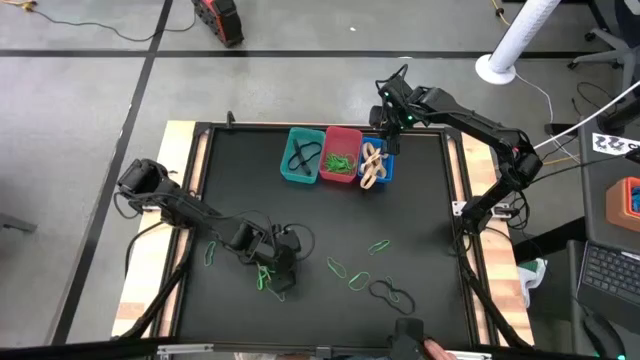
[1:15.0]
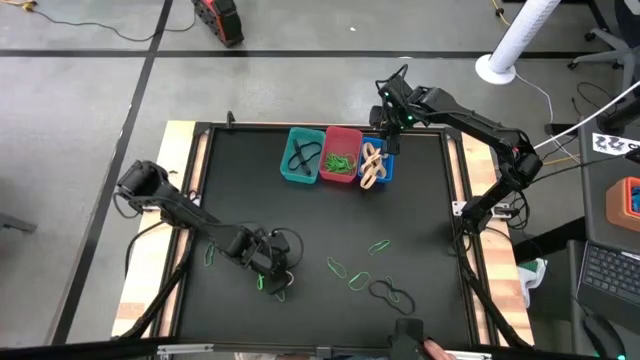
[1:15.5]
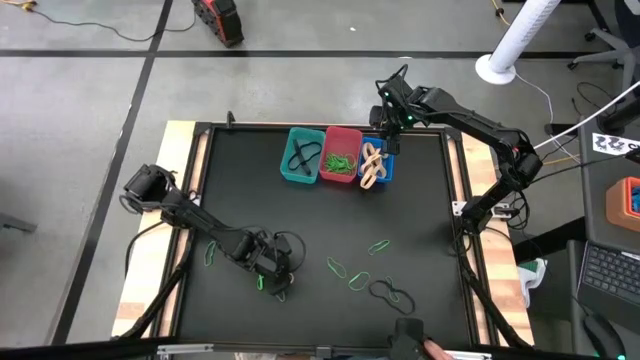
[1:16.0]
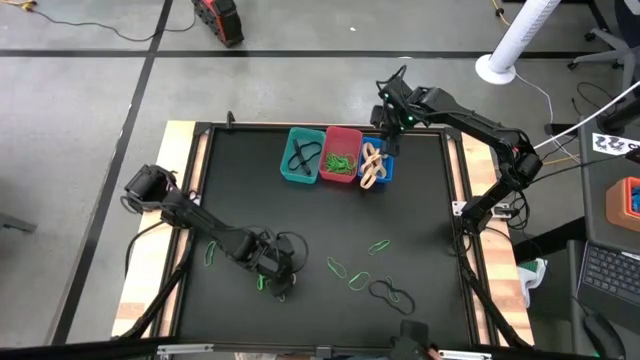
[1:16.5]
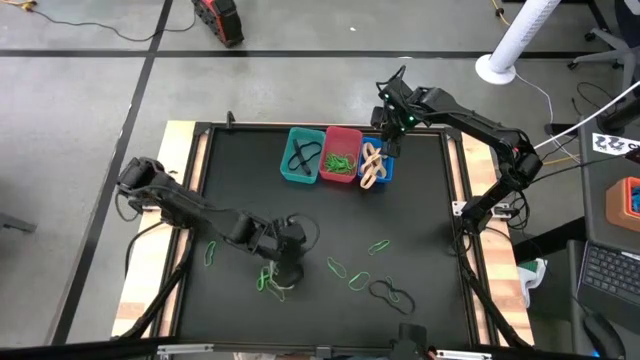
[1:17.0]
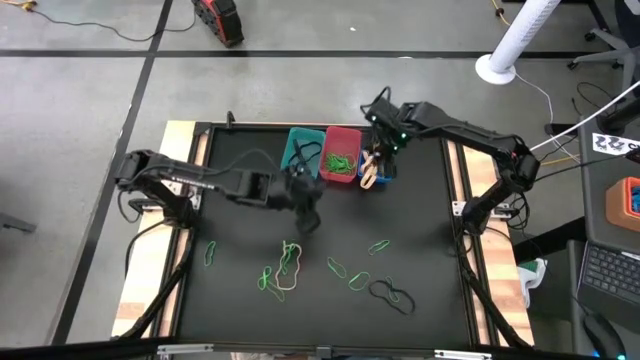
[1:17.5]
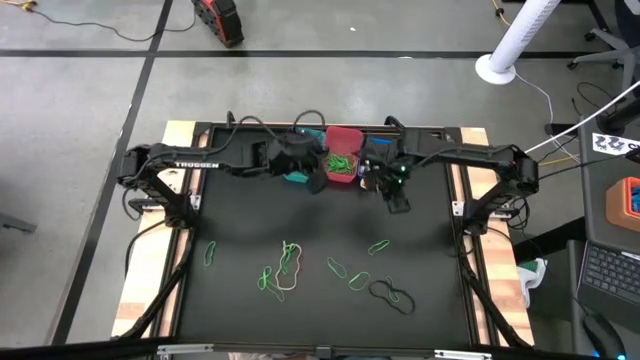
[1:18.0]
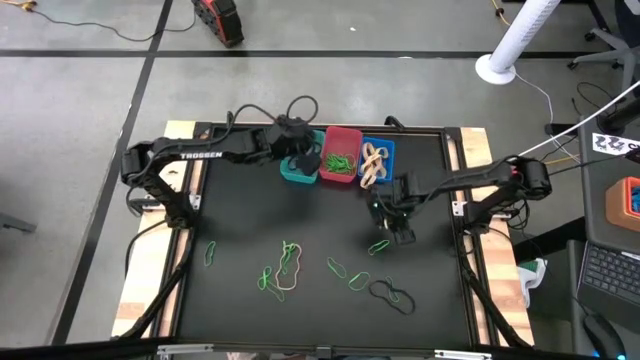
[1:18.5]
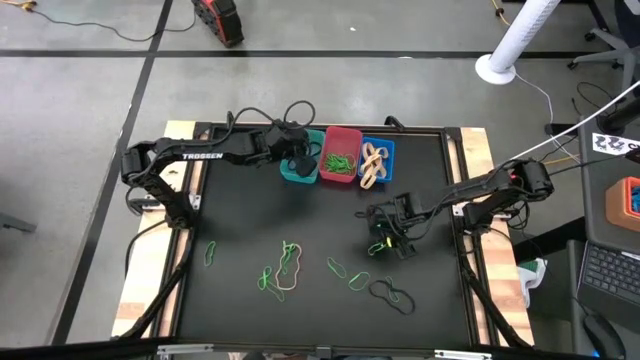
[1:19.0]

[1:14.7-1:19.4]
Task: Sort rubber bands into baskets
Put the black rubber band into the light blue bin

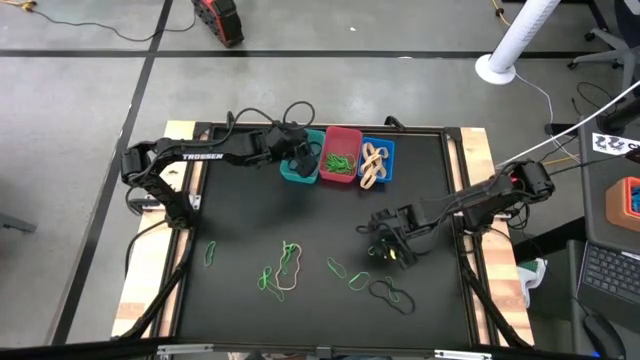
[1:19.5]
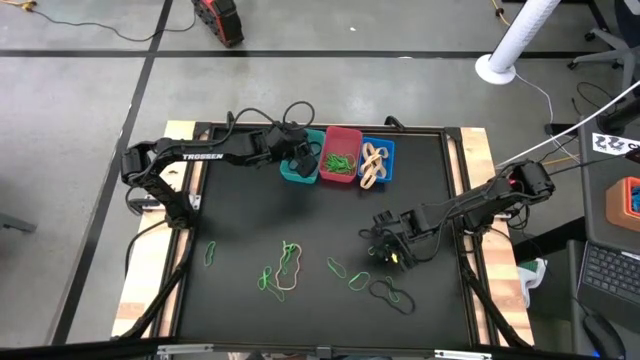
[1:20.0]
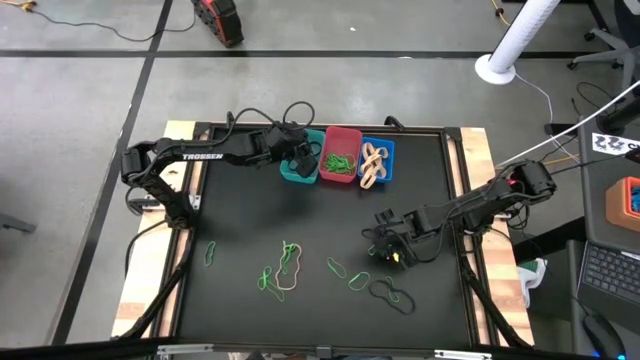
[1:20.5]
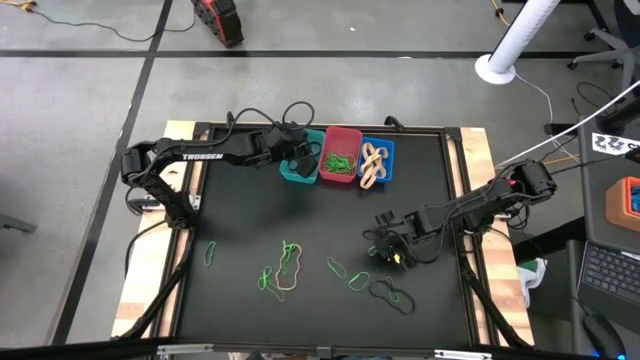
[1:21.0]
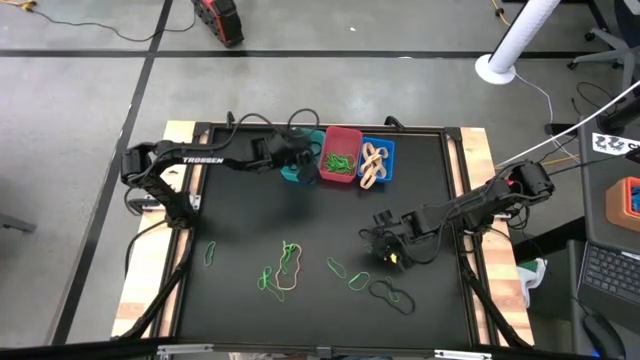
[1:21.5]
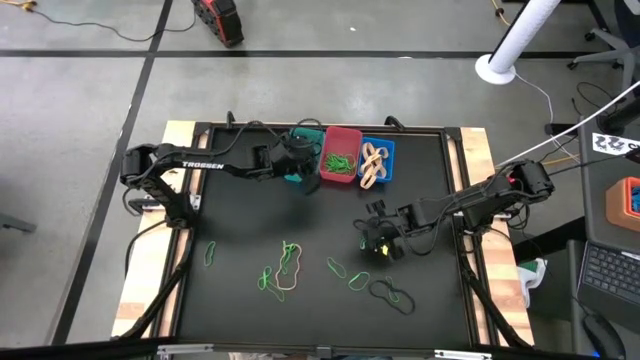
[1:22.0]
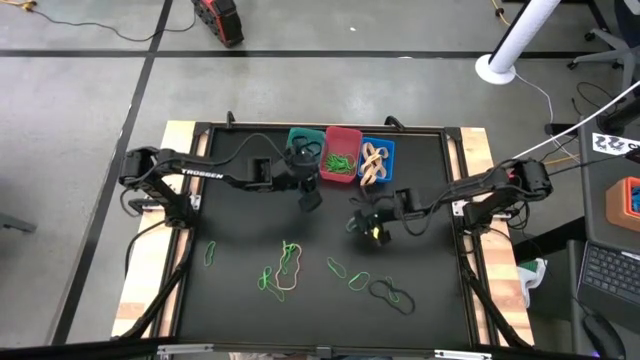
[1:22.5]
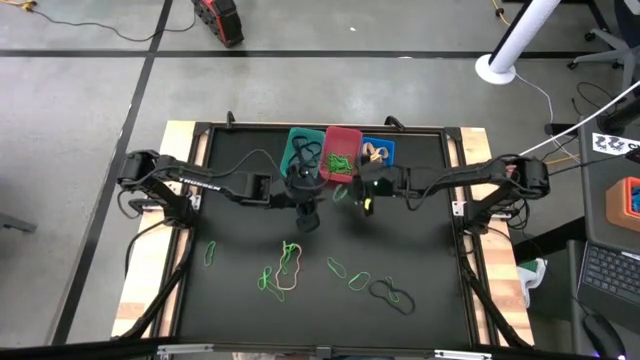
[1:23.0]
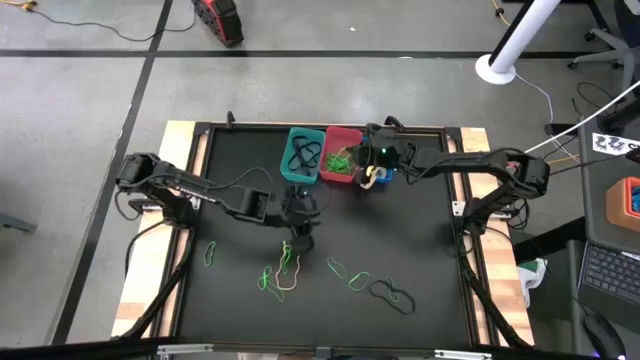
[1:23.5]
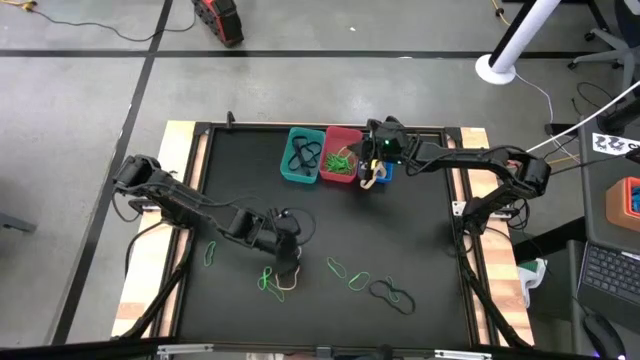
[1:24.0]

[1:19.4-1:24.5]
Put the green rubber band into the pink bin

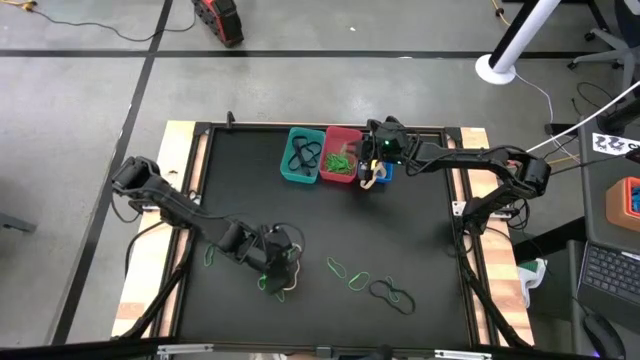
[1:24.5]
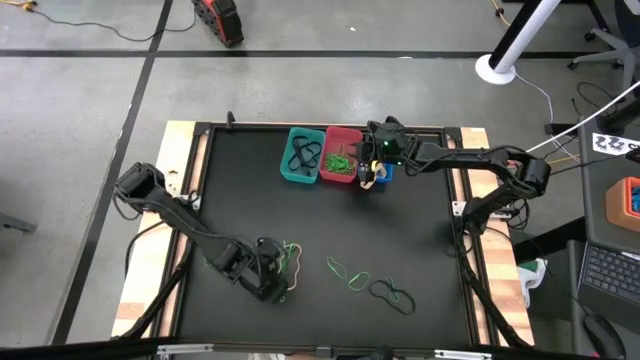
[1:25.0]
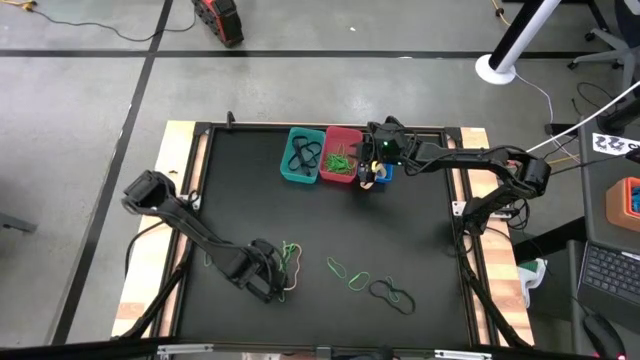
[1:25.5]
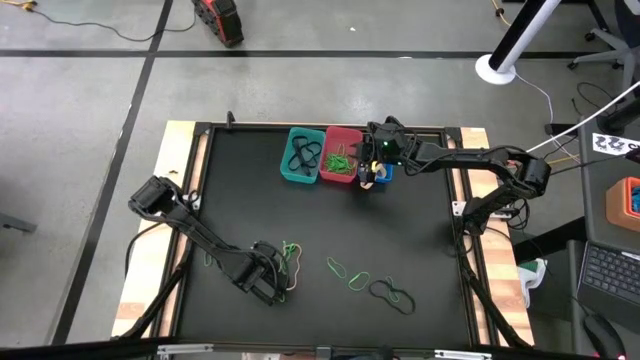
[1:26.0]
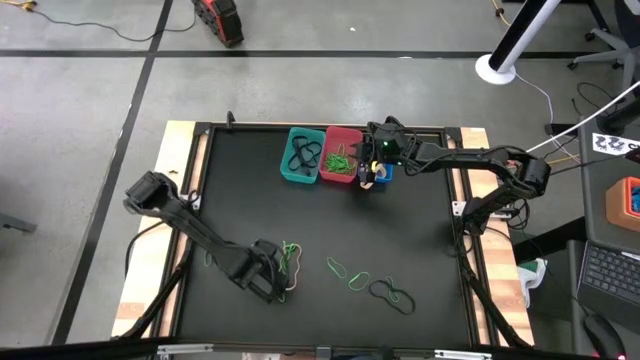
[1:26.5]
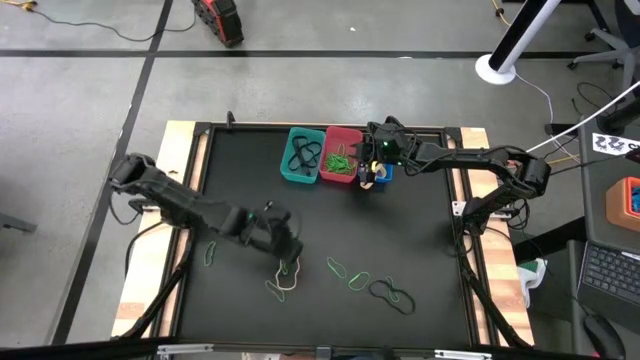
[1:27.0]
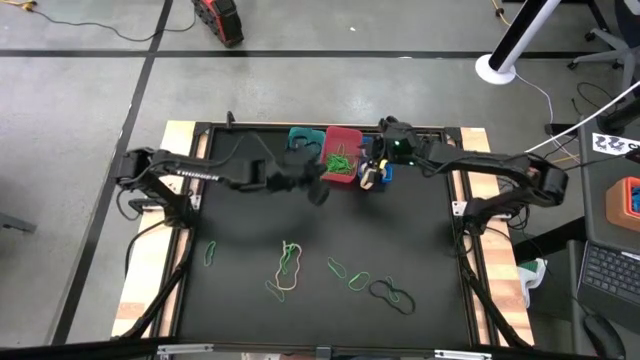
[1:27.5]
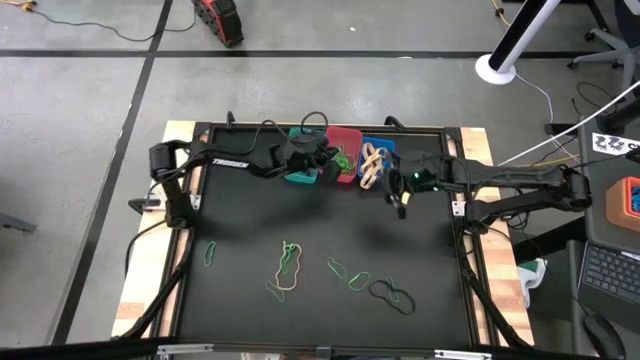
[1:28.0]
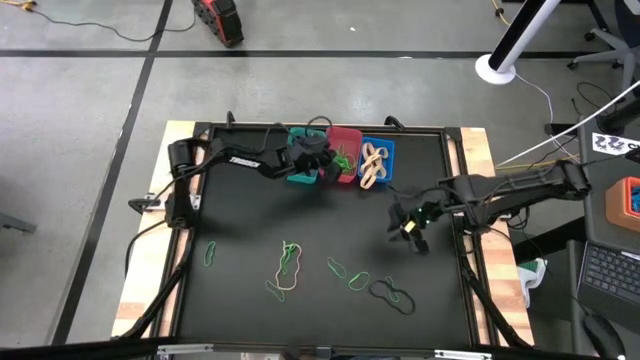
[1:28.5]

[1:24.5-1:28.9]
Put the green rubber band into the pink bin

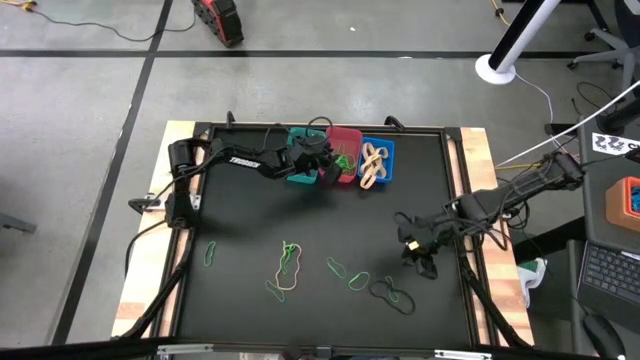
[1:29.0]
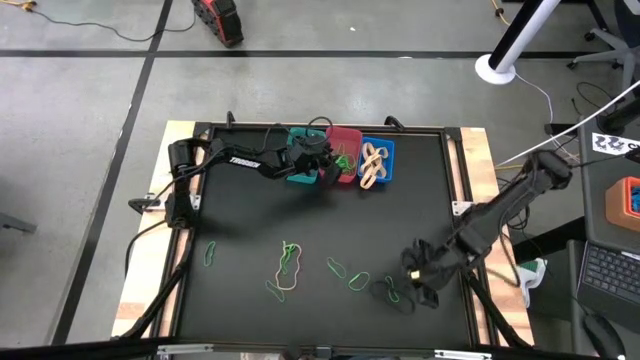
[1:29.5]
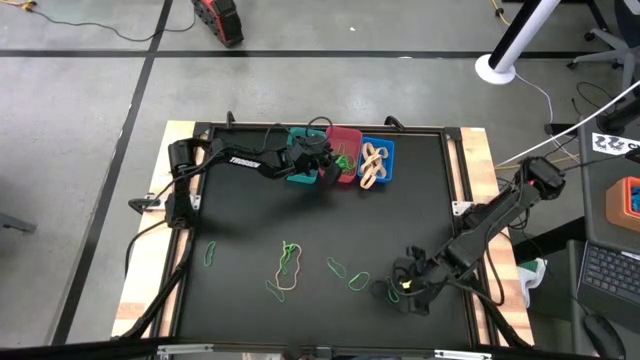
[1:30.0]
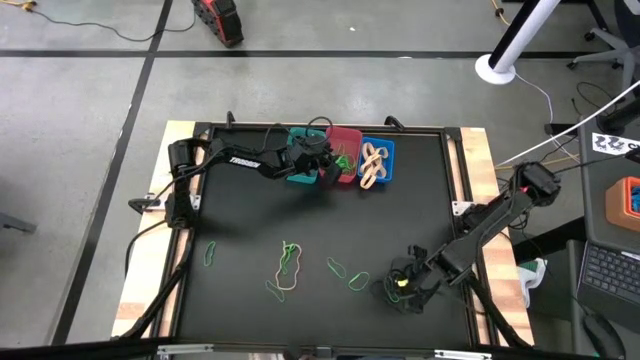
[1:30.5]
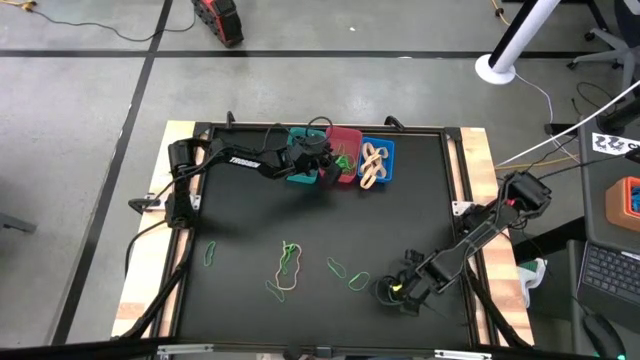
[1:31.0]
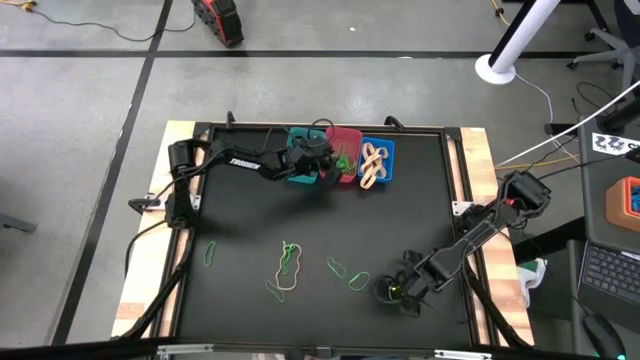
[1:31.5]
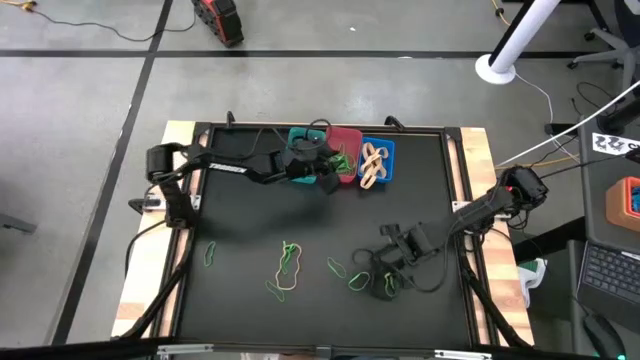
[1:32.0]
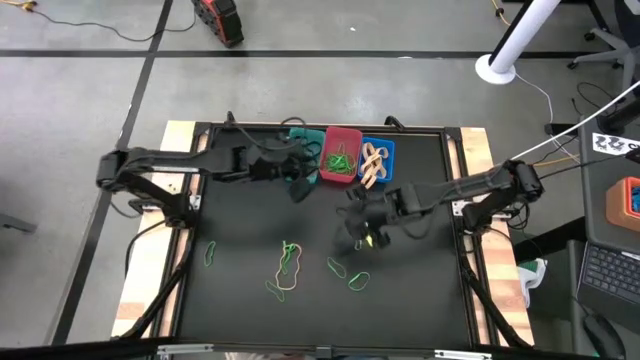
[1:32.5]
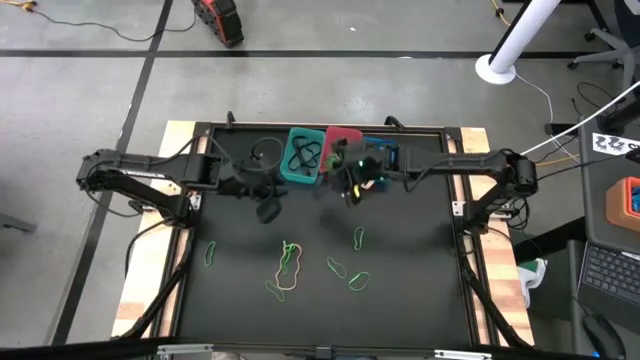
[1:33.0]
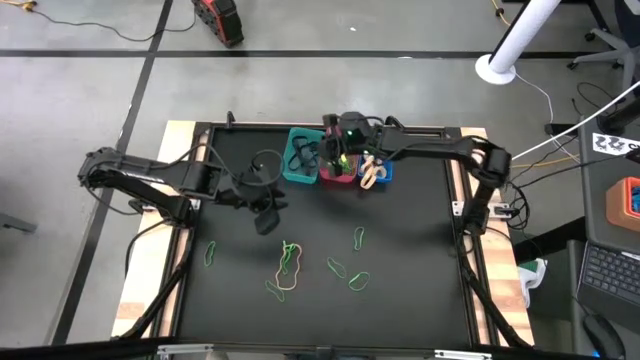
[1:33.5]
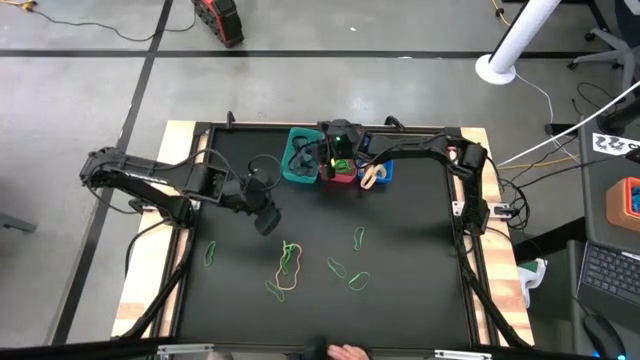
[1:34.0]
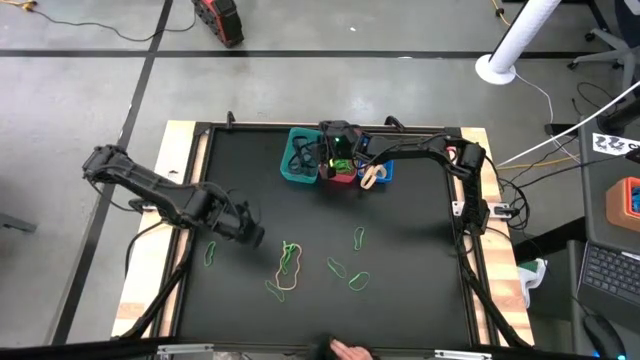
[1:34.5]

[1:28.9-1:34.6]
Put the black rubber band into the light blue bin
